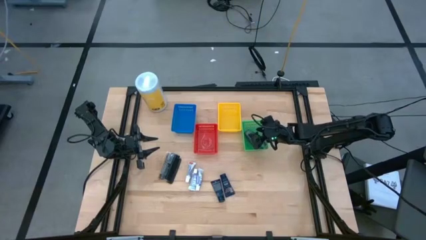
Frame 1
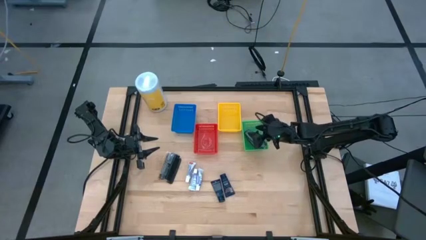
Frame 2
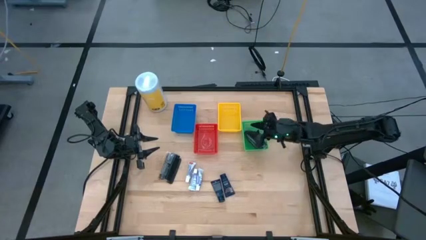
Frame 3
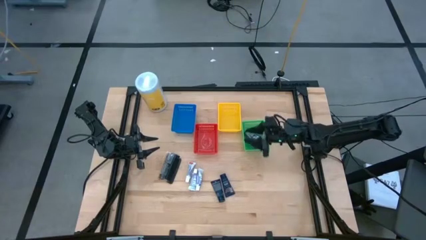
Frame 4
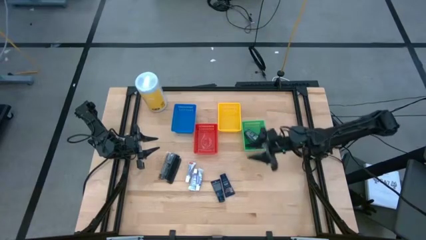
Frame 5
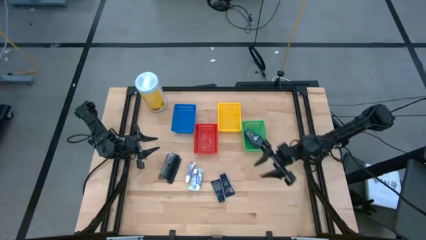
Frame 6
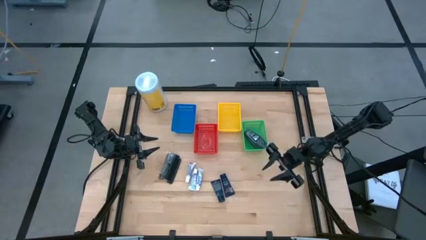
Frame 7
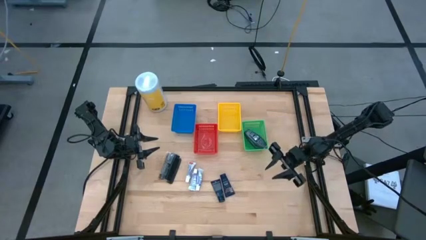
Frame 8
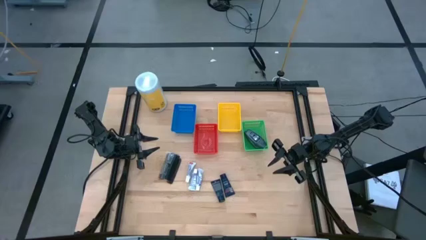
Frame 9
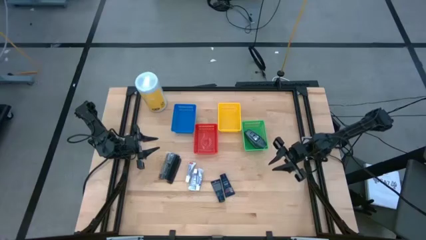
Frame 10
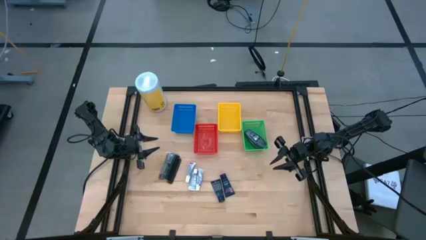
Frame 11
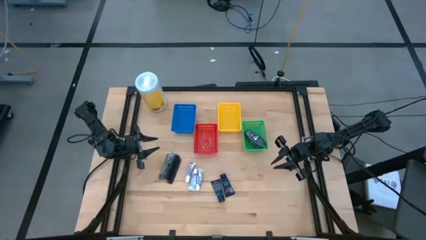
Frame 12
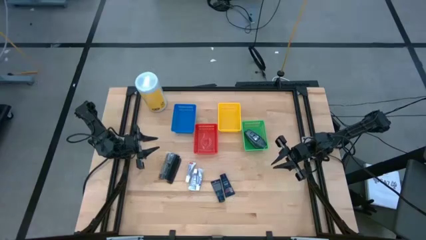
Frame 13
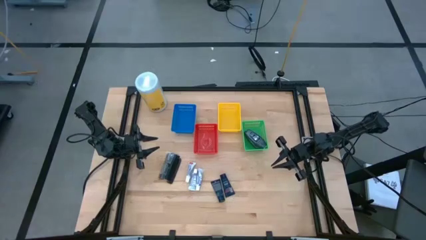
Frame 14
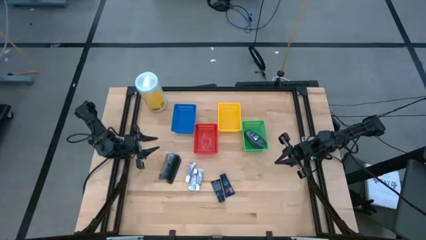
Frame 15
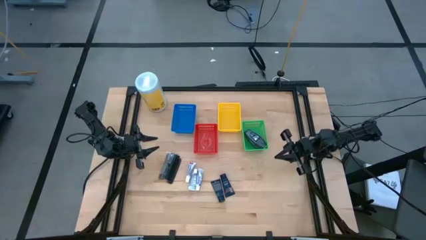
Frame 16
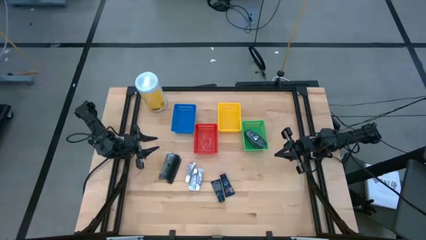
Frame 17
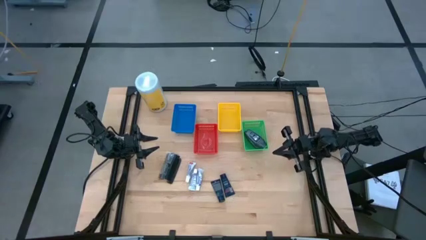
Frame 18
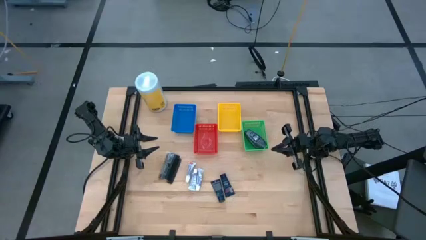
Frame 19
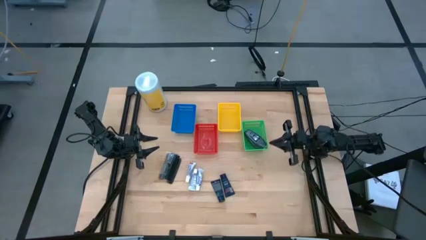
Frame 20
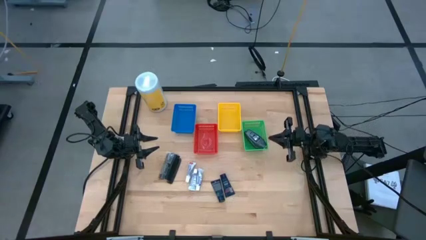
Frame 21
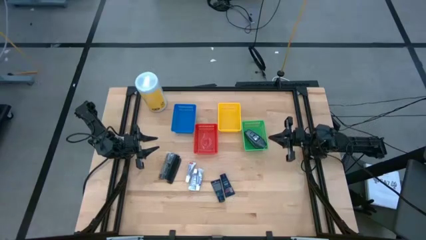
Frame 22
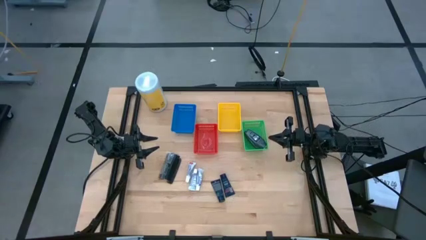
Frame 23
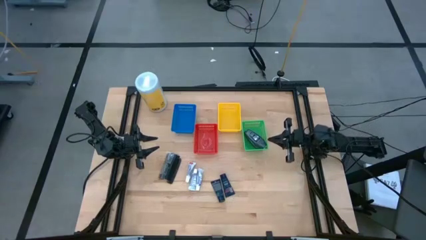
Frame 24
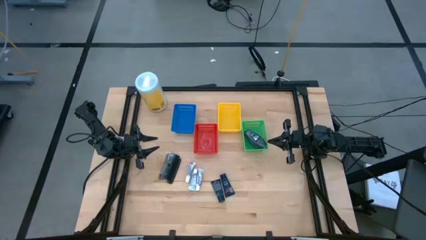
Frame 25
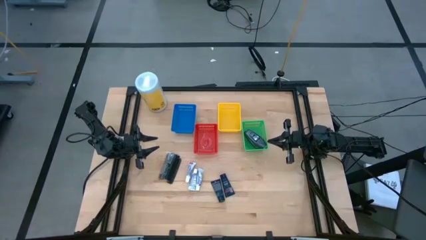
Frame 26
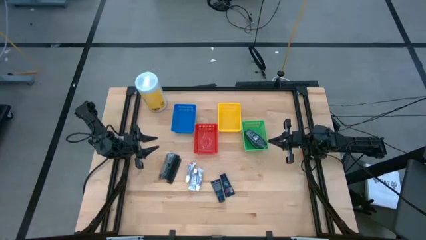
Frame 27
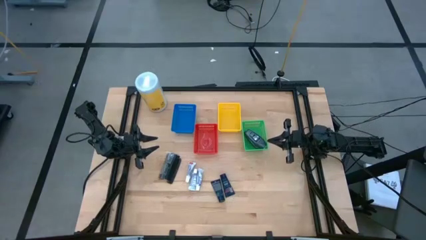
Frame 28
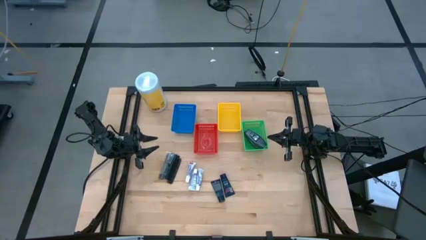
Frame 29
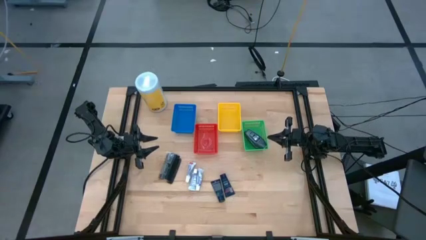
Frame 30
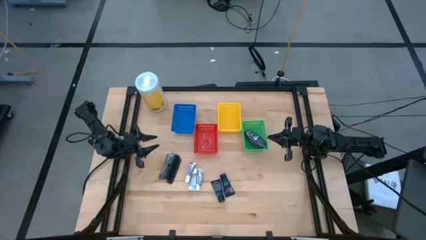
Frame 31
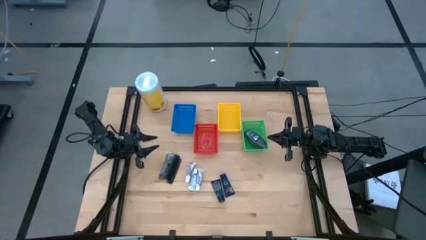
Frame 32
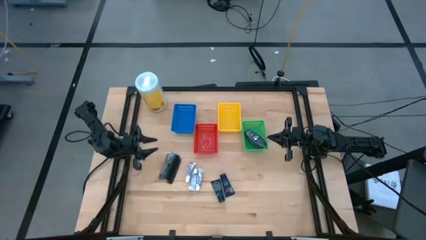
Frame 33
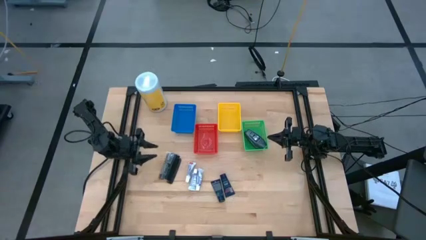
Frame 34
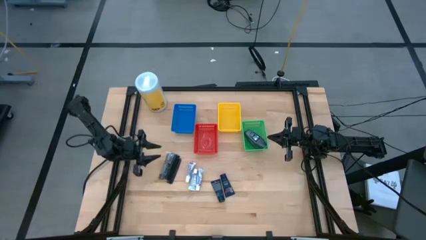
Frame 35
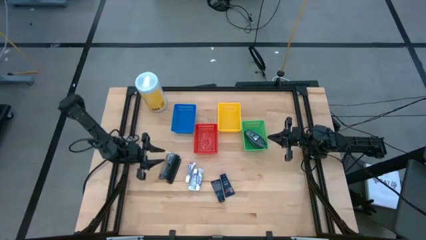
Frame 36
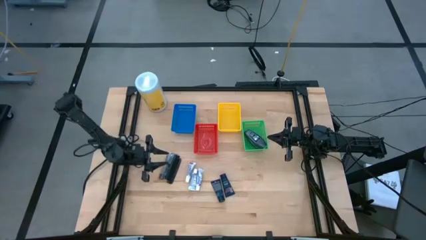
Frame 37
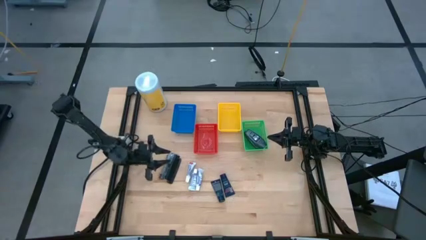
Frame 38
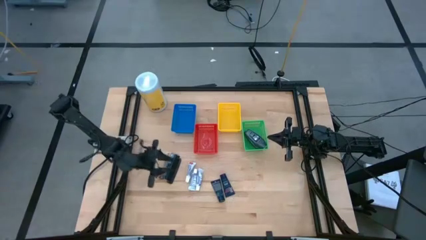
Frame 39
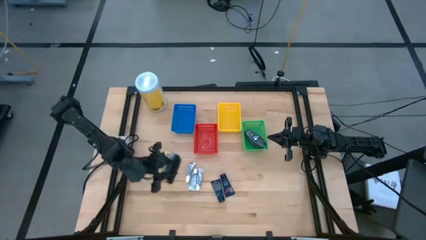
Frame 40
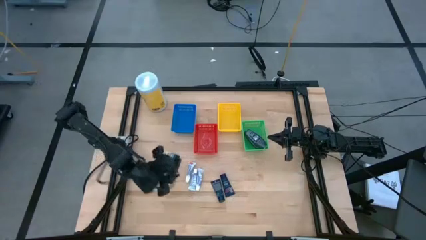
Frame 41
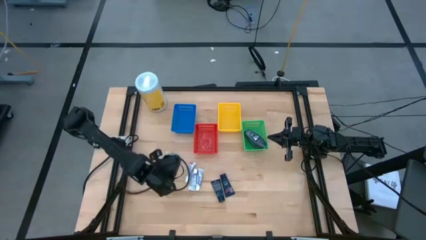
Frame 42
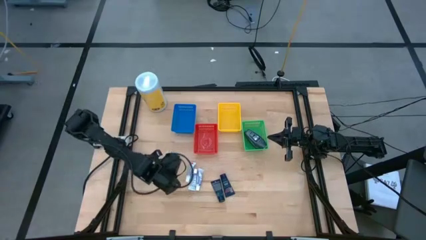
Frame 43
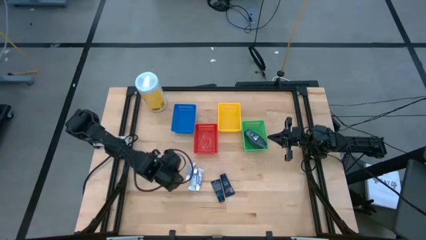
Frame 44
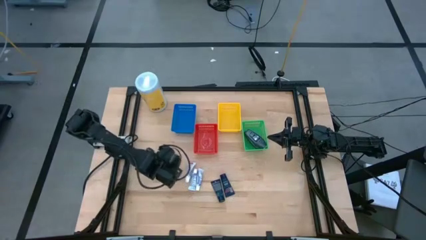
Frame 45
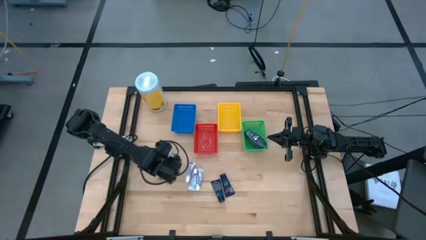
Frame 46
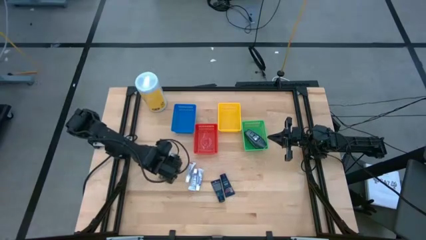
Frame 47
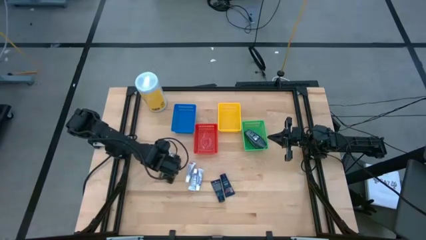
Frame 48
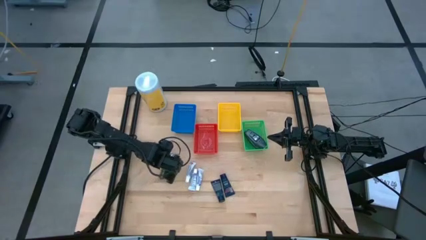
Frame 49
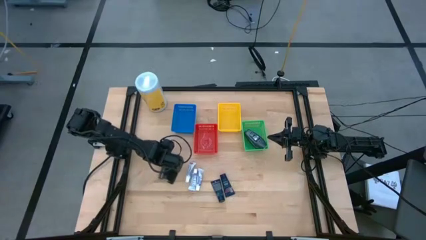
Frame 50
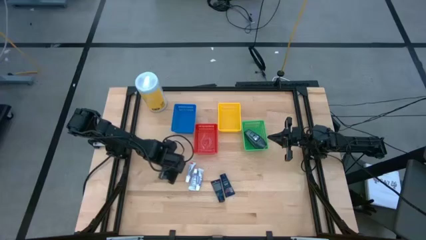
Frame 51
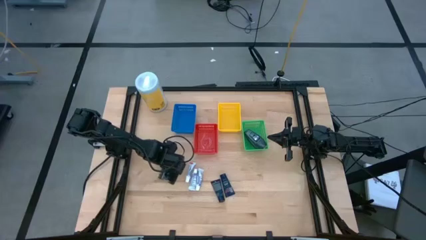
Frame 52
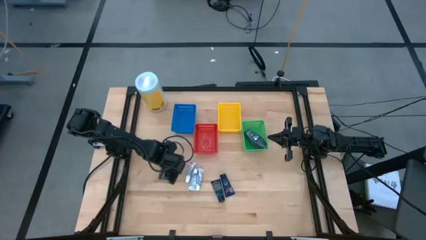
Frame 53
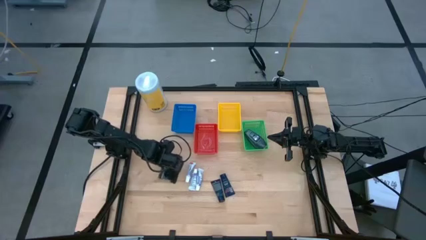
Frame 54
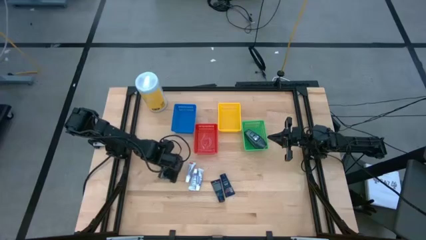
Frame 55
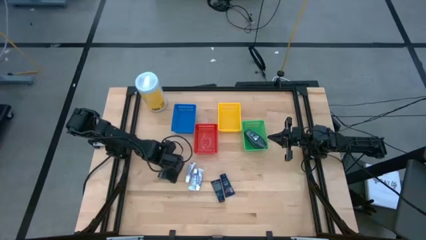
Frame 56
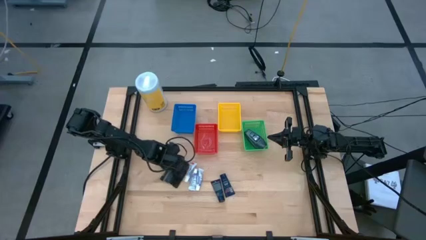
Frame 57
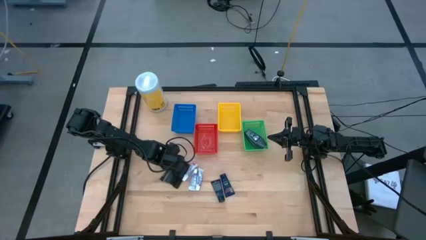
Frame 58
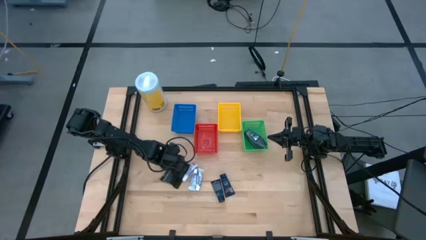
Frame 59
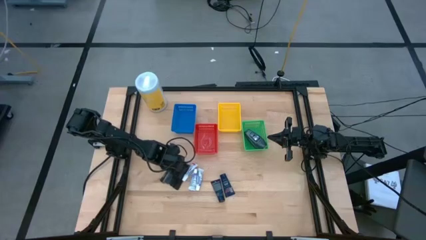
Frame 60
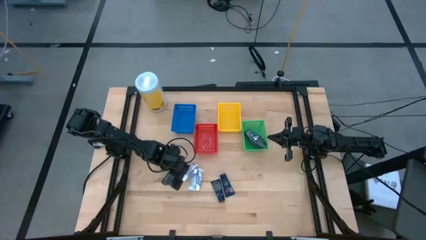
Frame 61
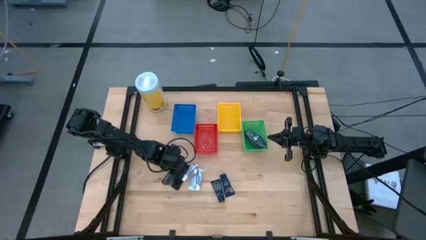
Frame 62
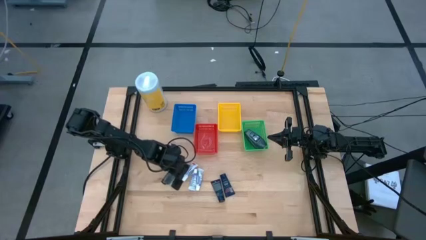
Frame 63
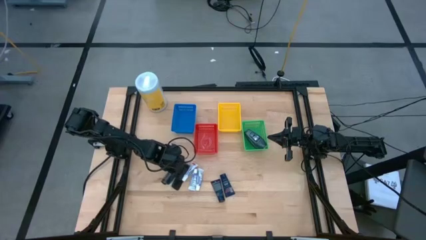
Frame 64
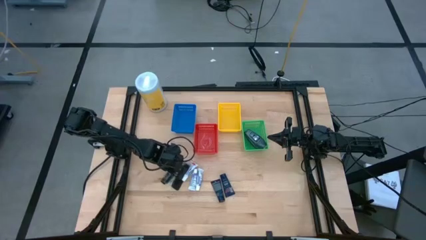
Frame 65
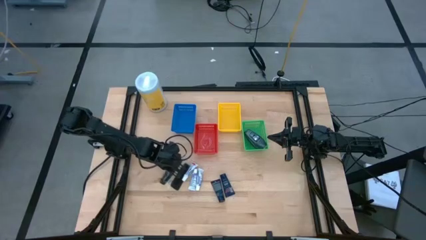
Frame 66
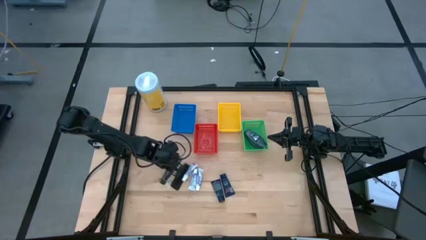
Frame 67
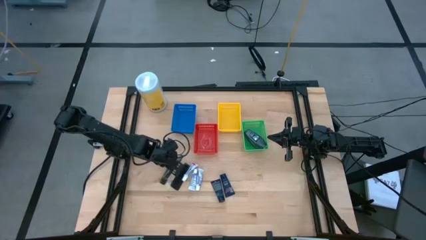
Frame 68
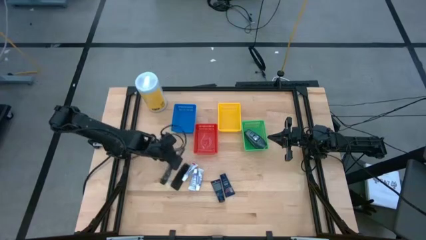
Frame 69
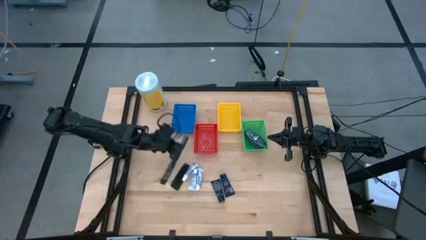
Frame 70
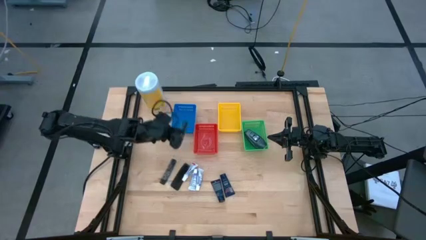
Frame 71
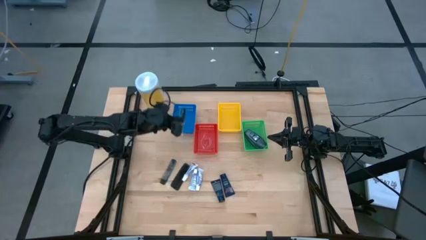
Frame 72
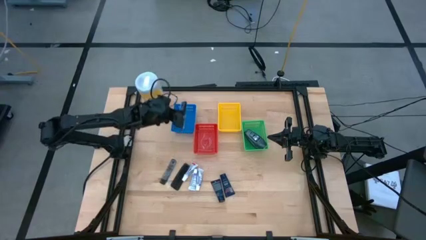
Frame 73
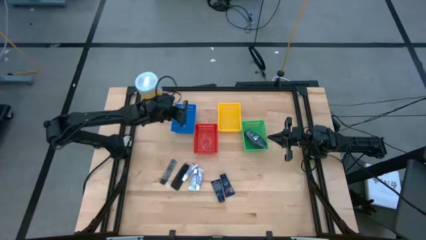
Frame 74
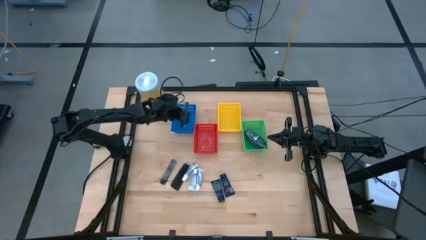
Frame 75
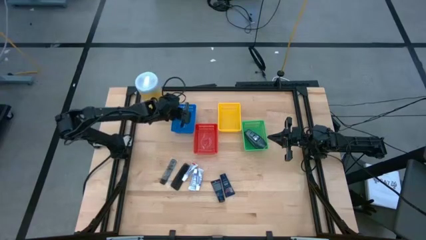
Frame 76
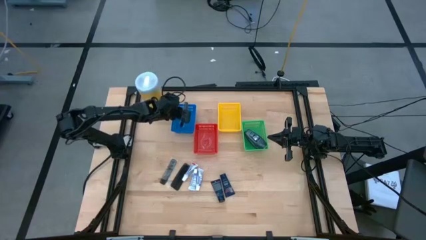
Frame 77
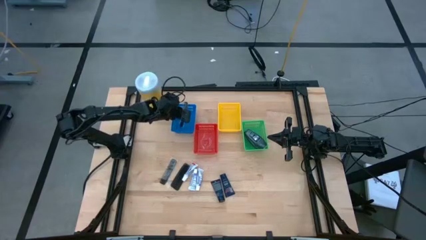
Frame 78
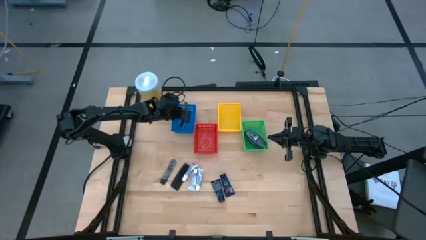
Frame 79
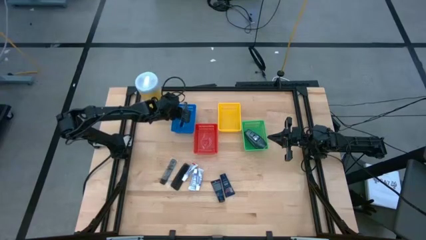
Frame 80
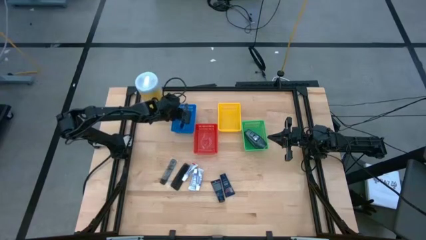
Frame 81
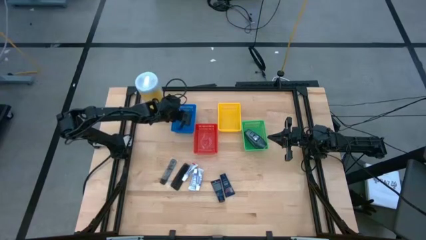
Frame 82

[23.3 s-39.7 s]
Task: Pick & Place Travel size toiletries
Put the black bomb into the blue bin
